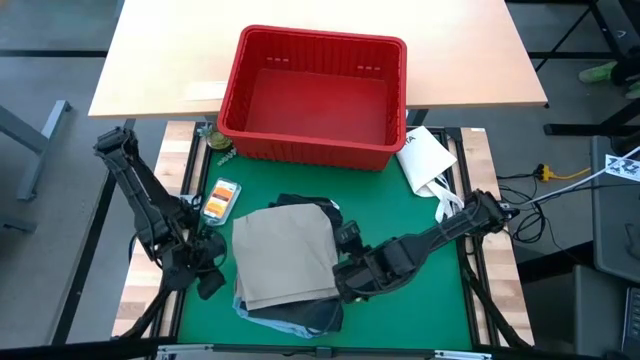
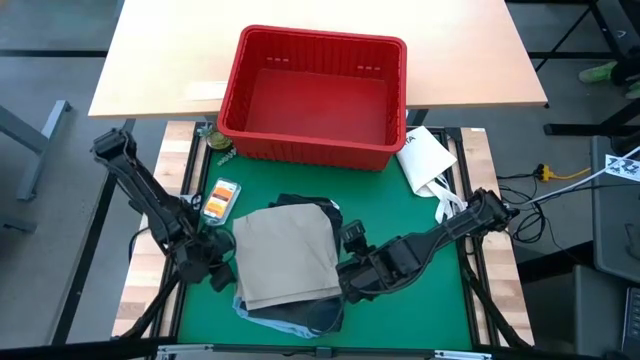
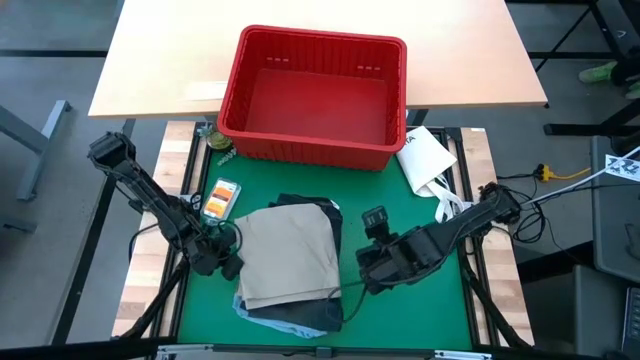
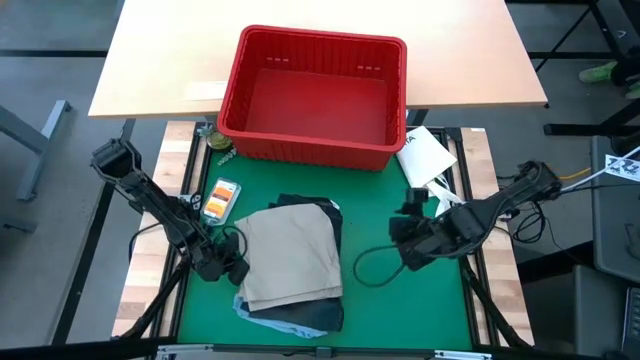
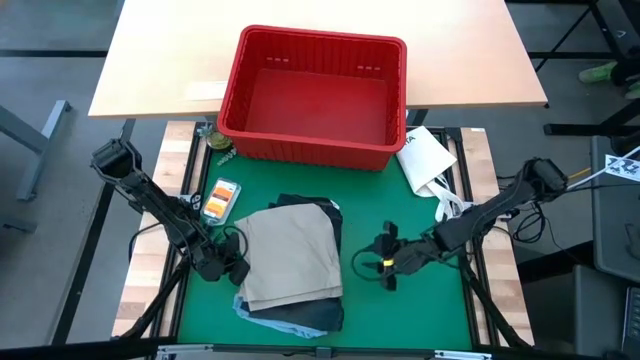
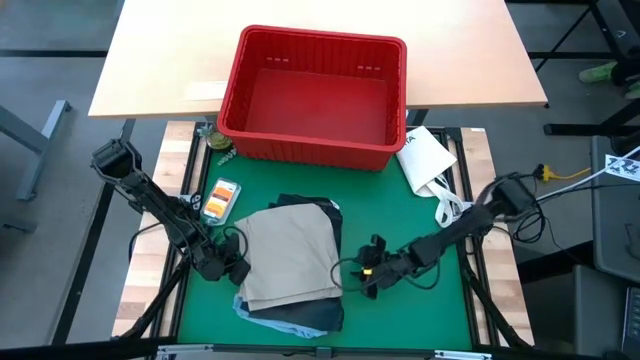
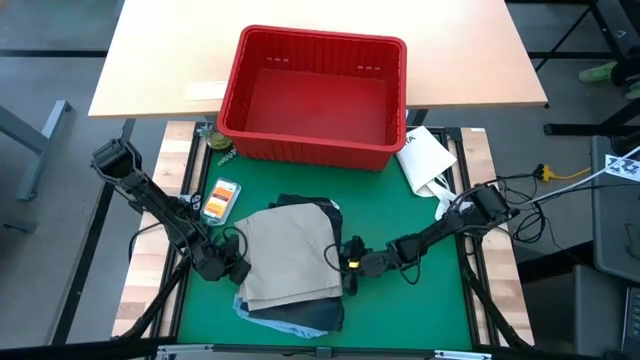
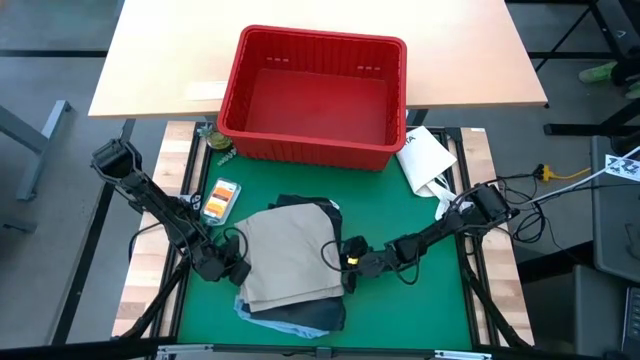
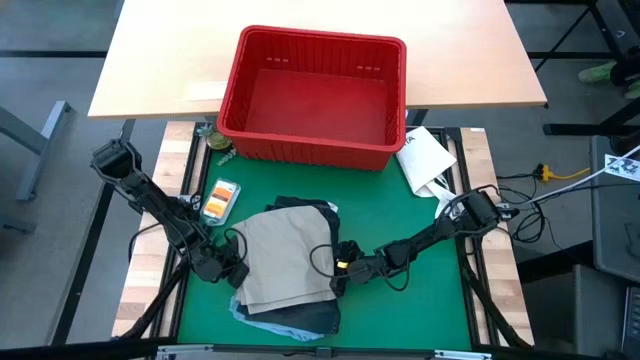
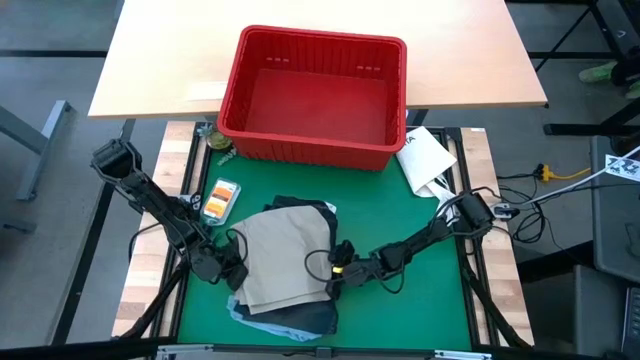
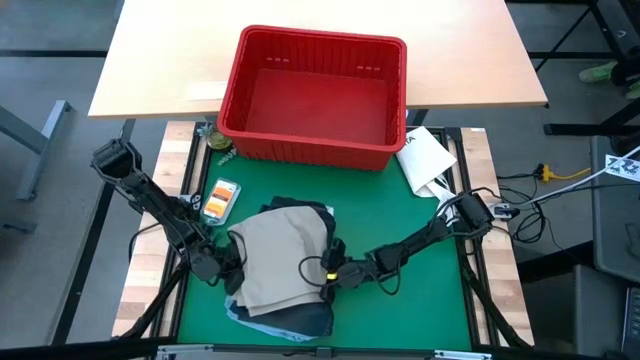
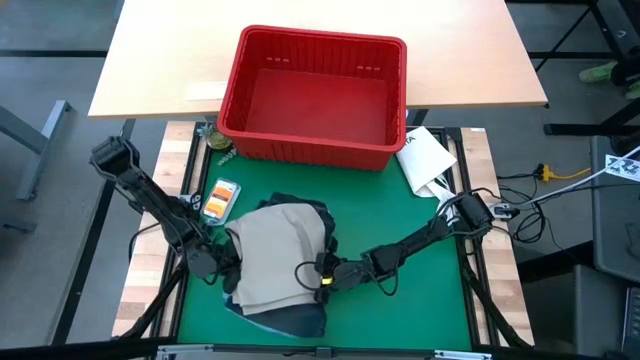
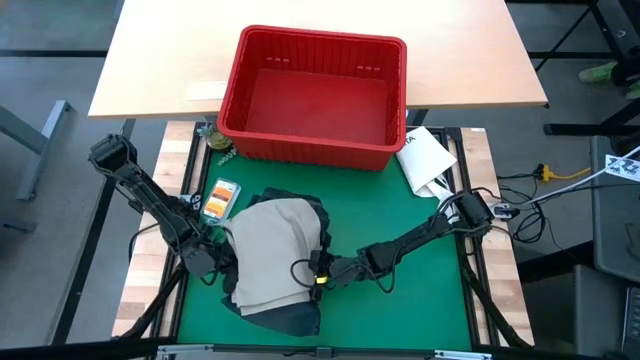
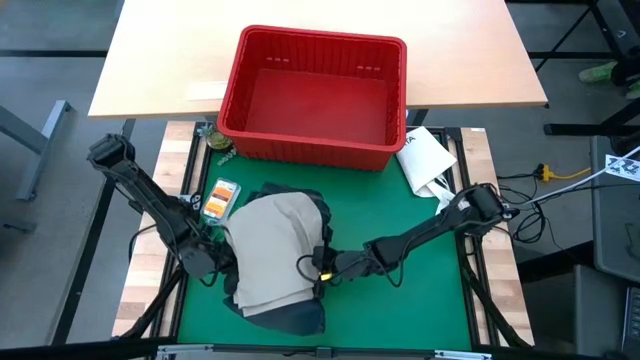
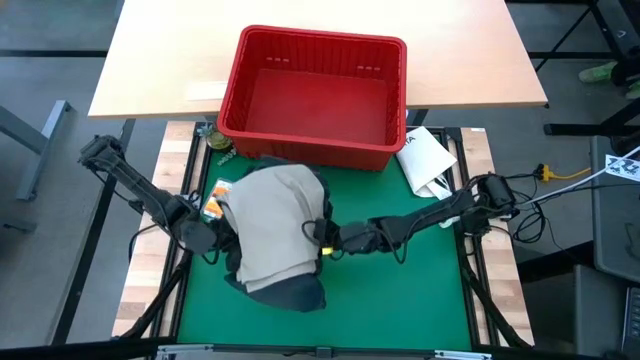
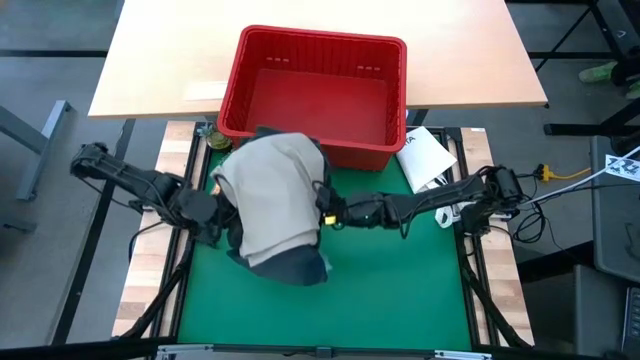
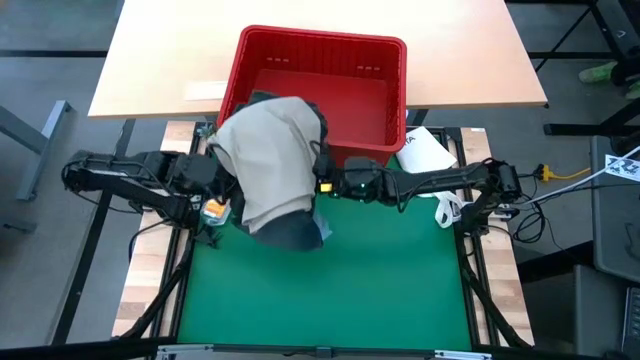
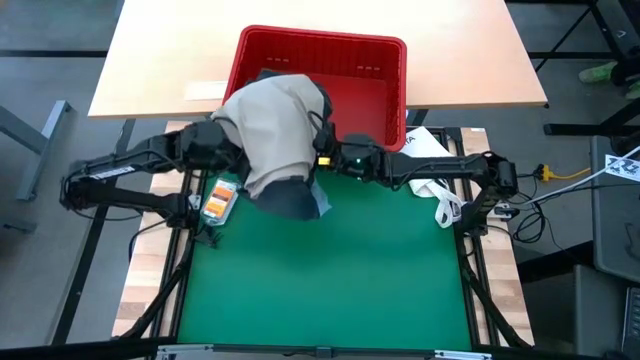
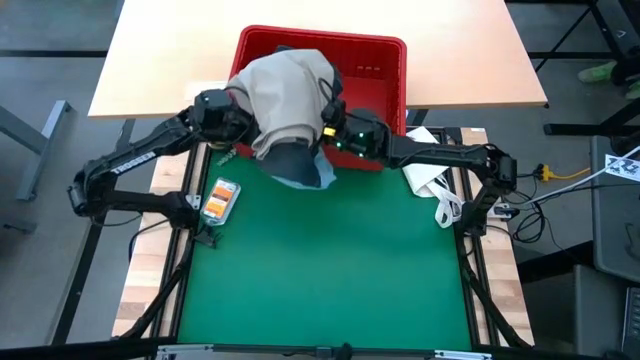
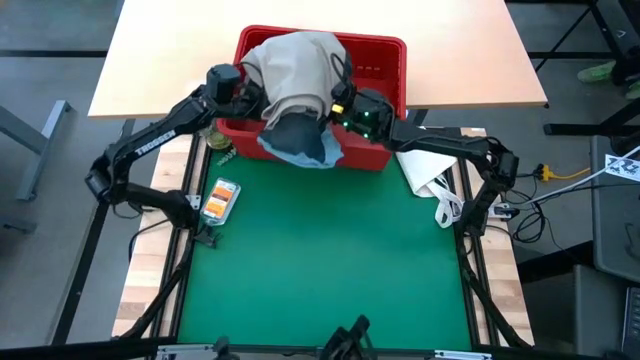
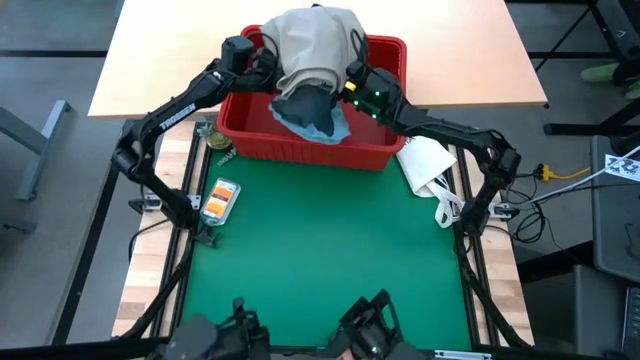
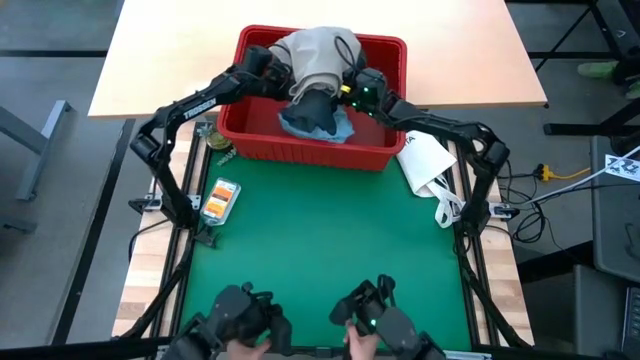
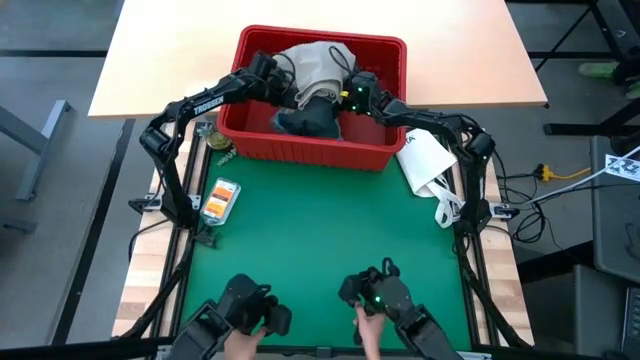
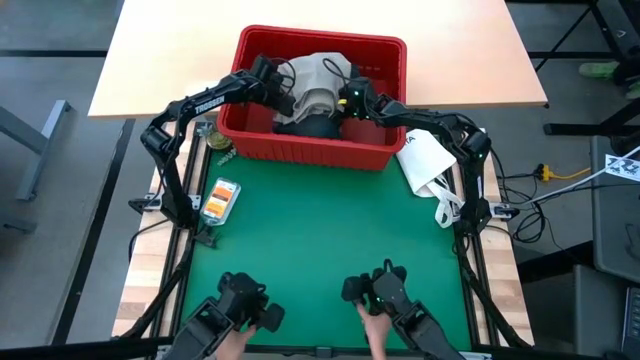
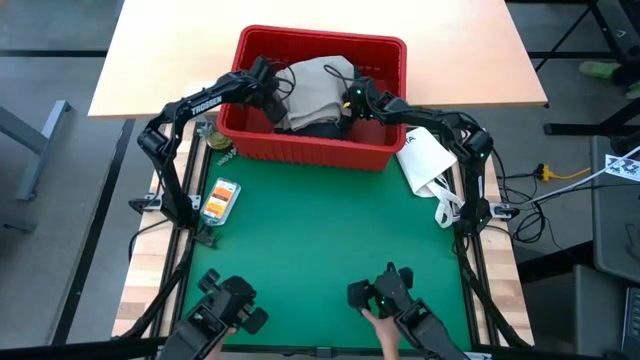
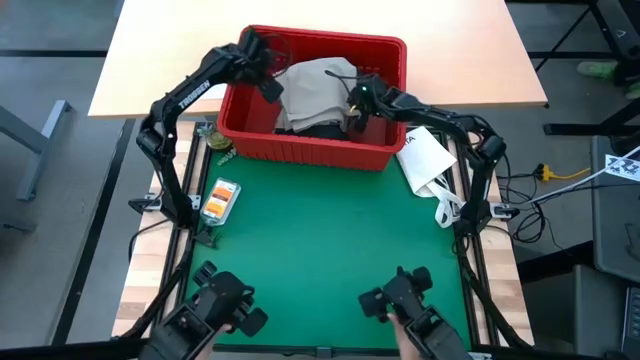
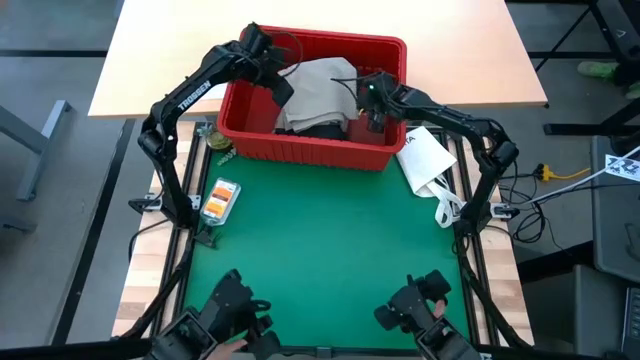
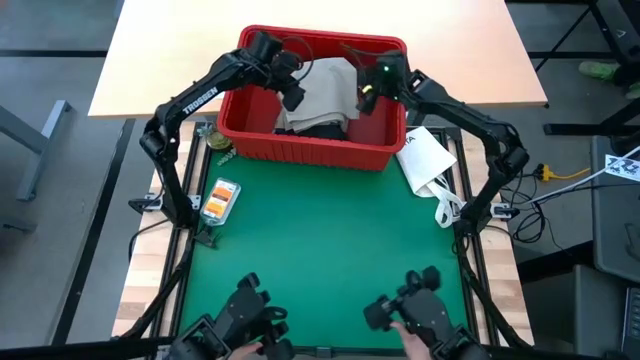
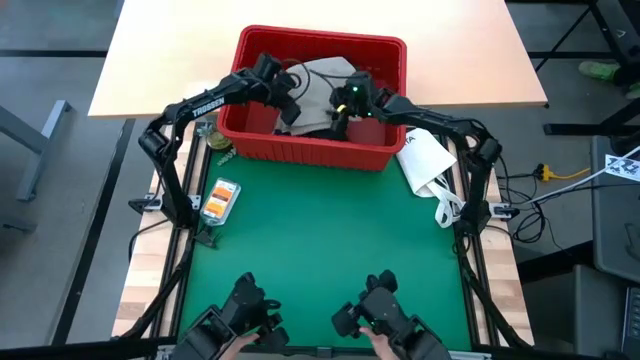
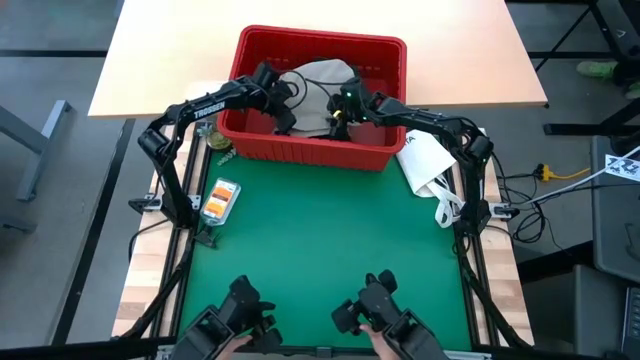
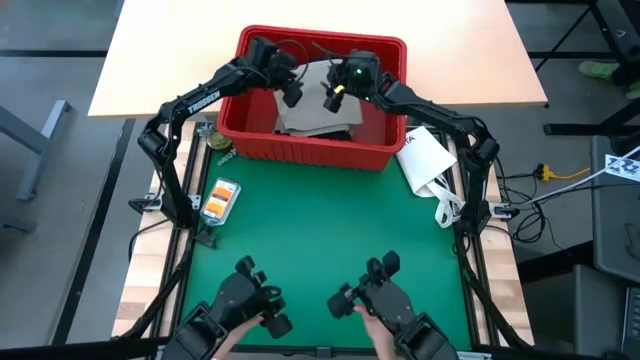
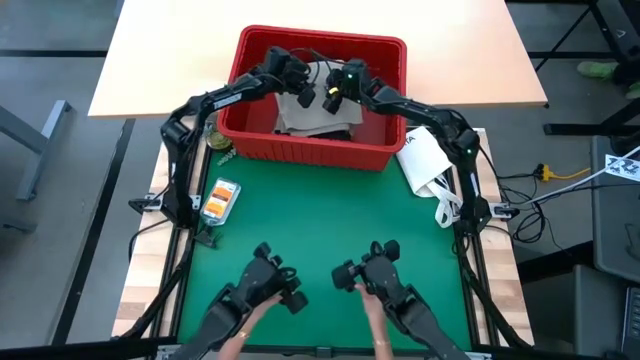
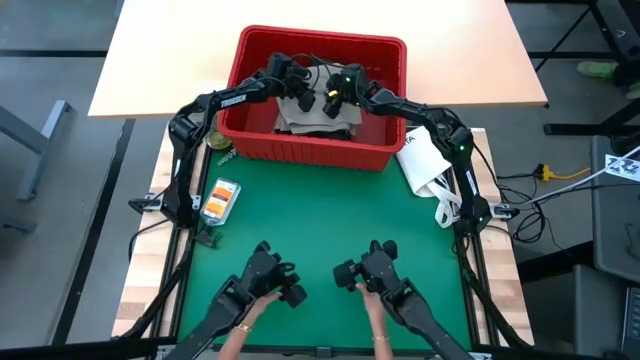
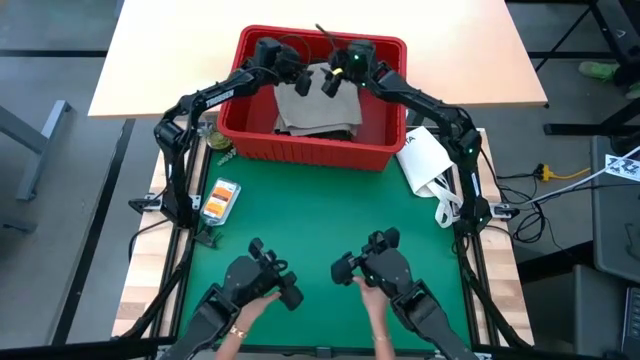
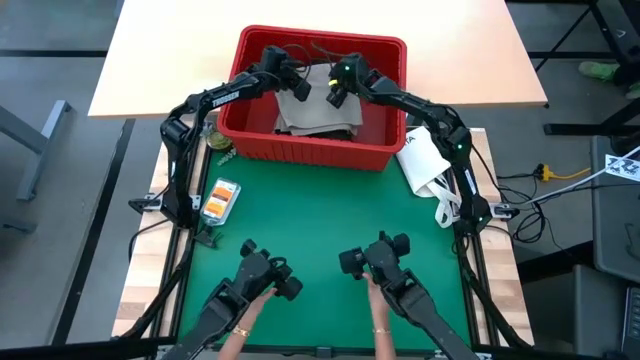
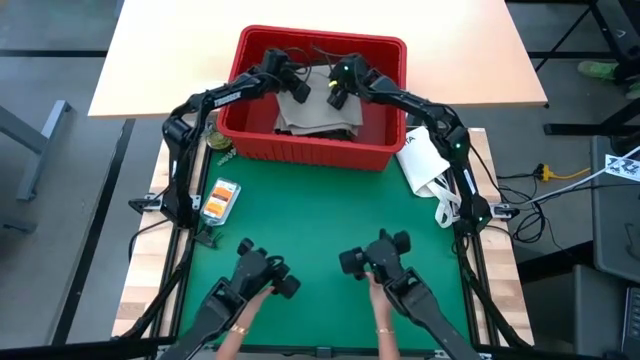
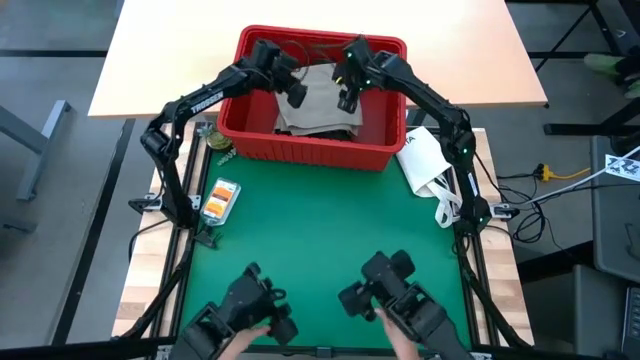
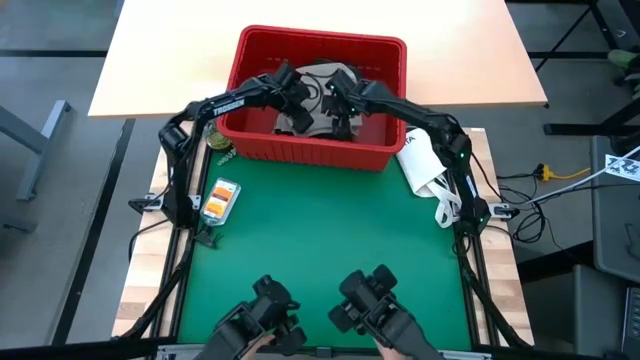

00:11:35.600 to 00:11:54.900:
Task: Fold Laundry from Bin
Put the stacked of clothes into red bin

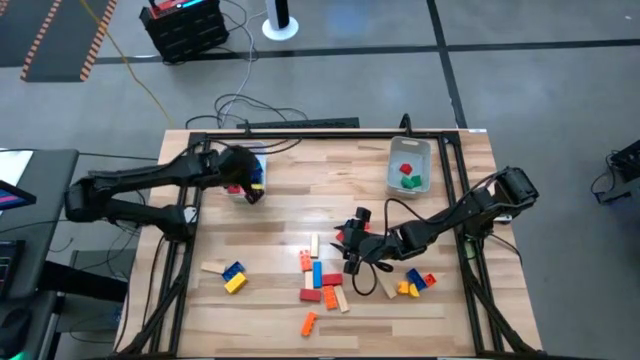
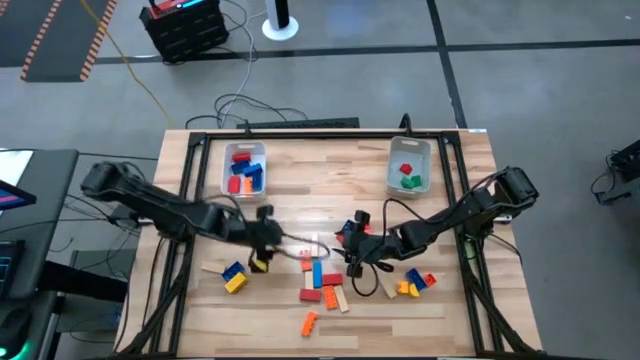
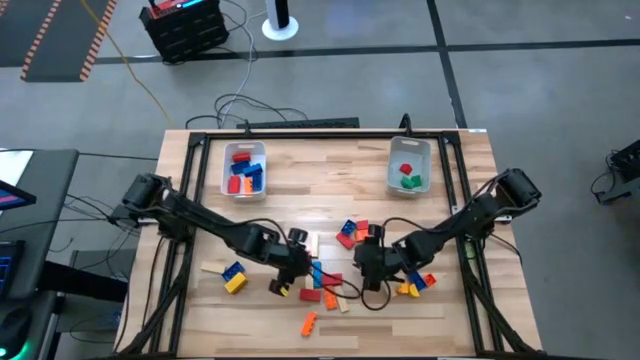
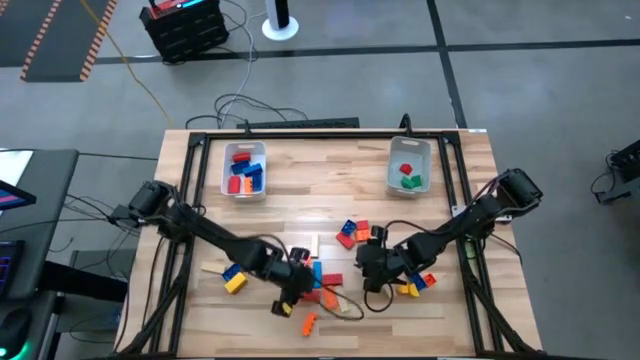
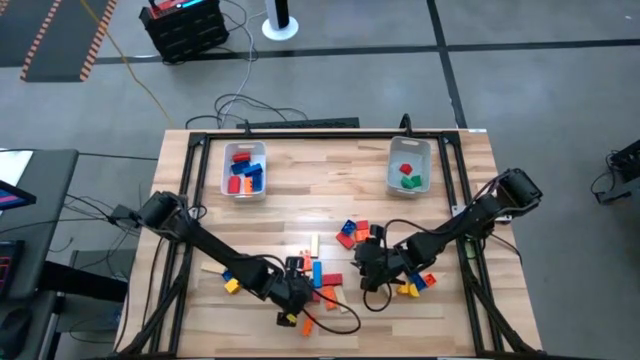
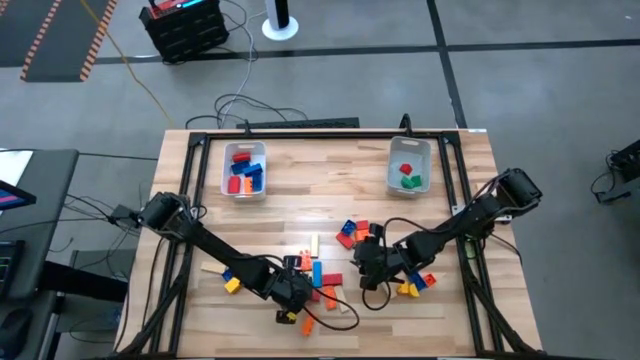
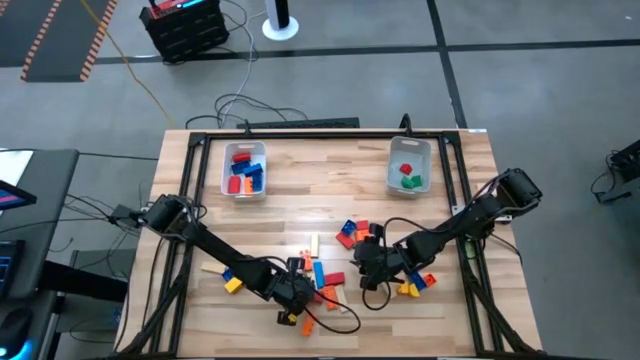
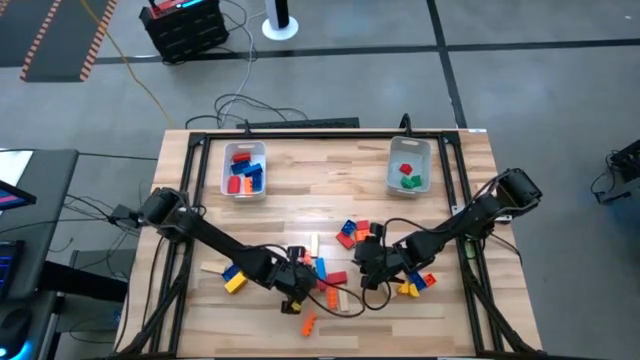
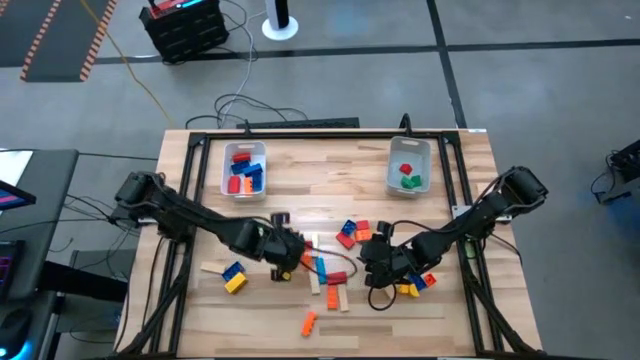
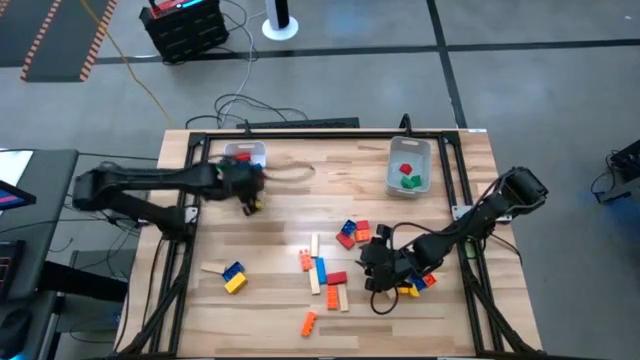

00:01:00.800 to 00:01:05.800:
Task: Sort blocks by size
Put the large red block into the white bin
